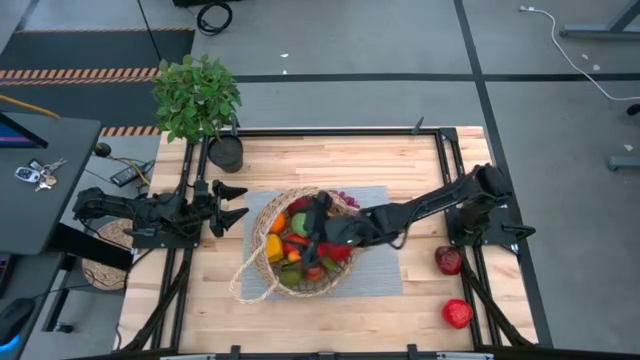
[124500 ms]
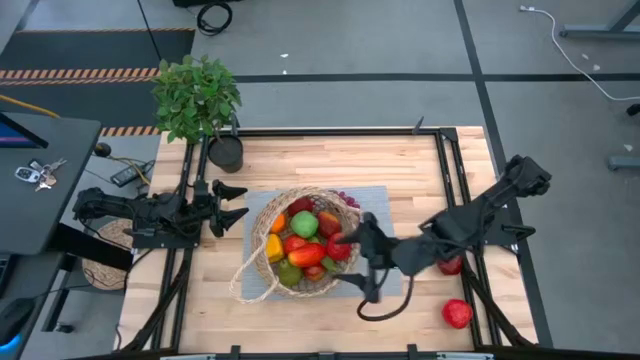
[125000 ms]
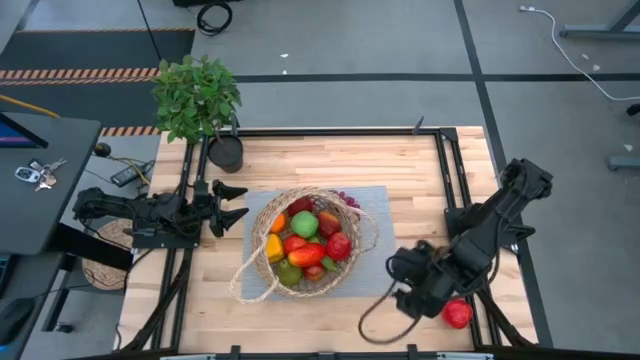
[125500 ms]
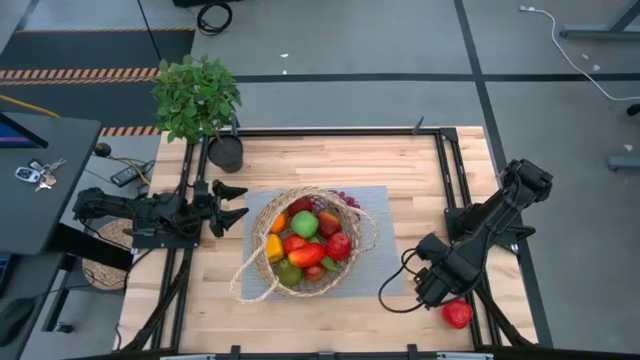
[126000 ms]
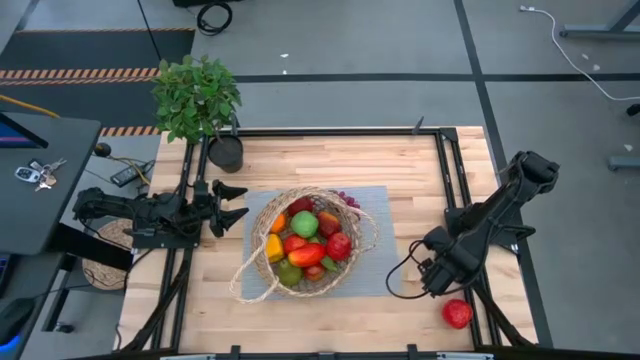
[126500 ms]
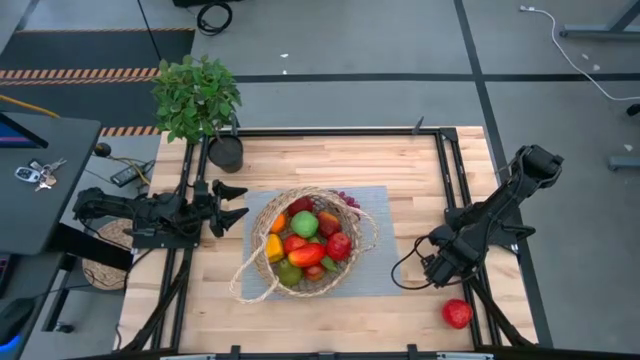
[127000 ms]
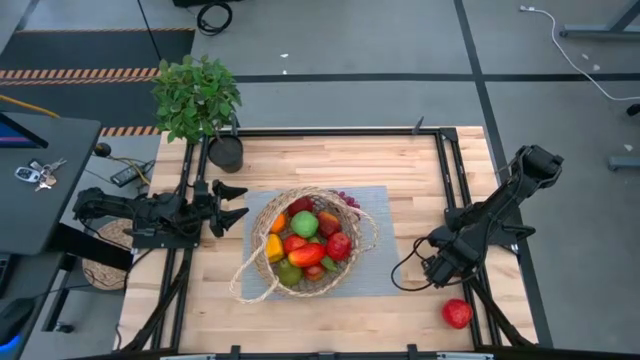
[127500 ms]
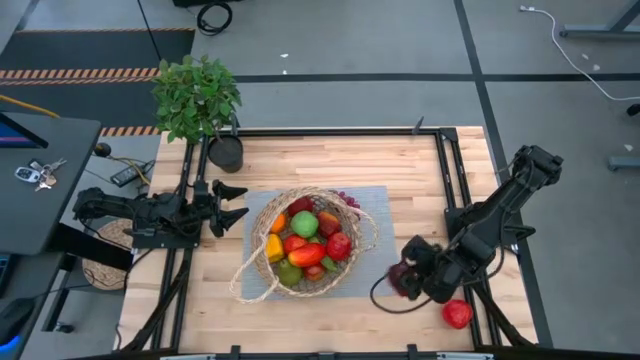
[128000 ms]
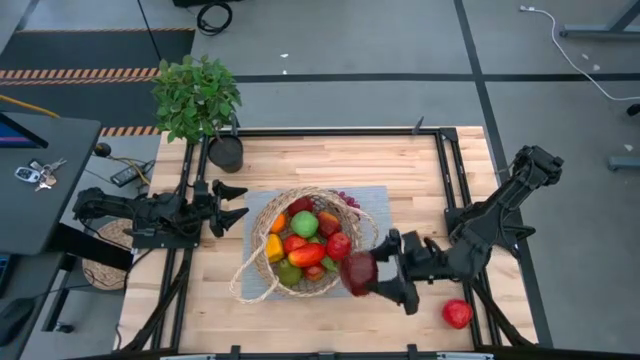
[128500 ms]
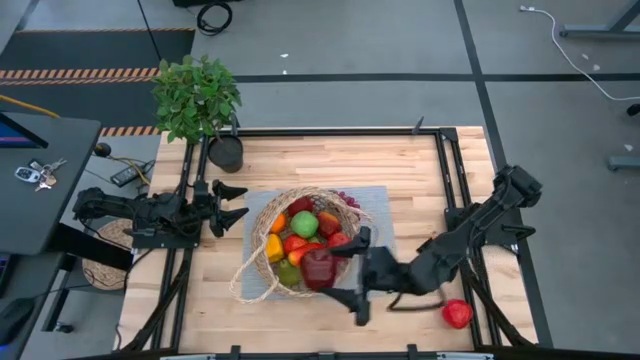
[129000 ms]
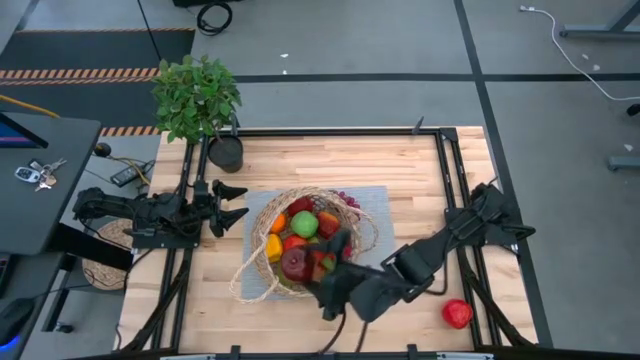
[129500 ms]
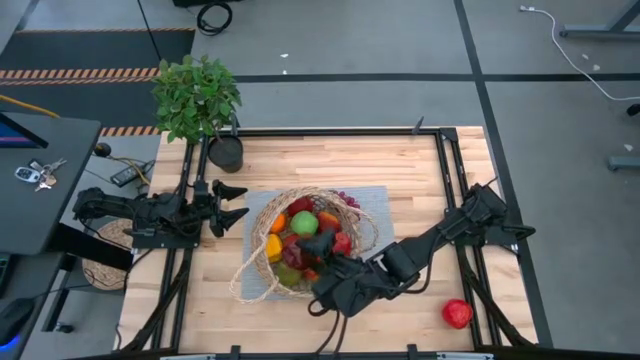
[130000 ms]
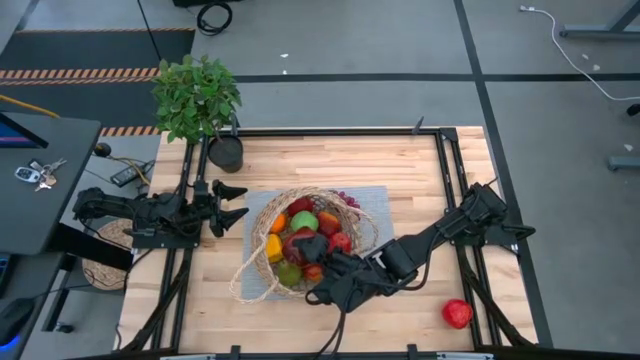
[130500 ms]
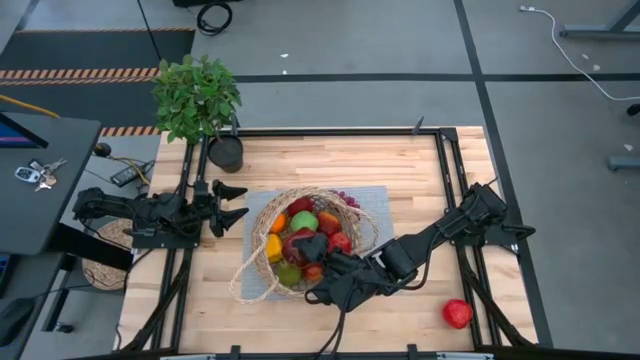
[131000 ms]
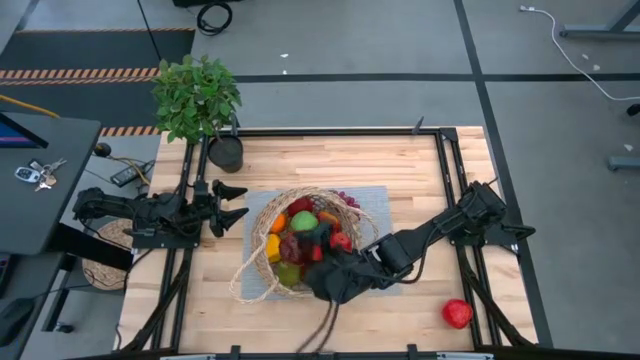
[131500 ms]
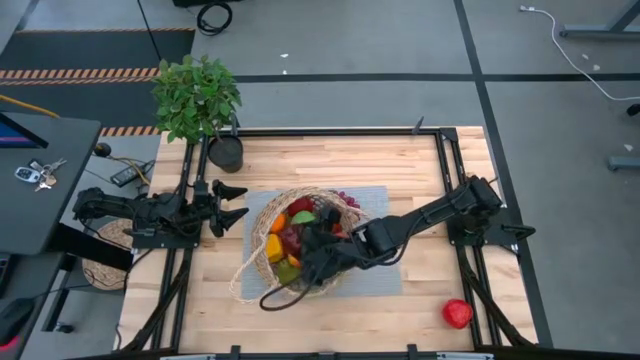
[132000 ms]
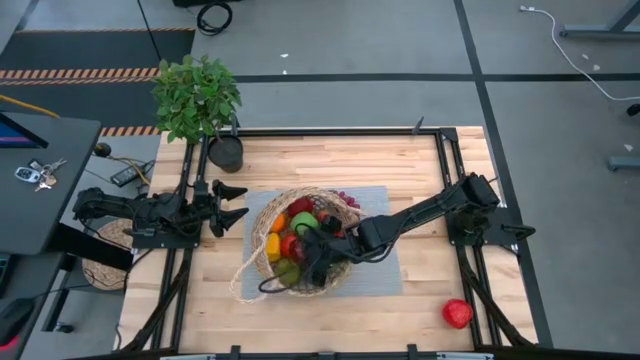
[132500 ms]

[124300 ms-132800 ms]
Task: Build produce basket
Put the dark red apple into the brown basket

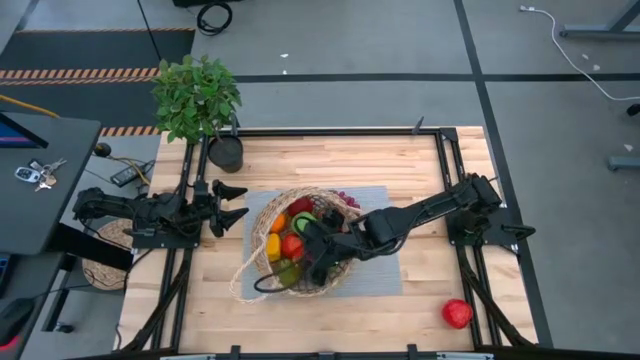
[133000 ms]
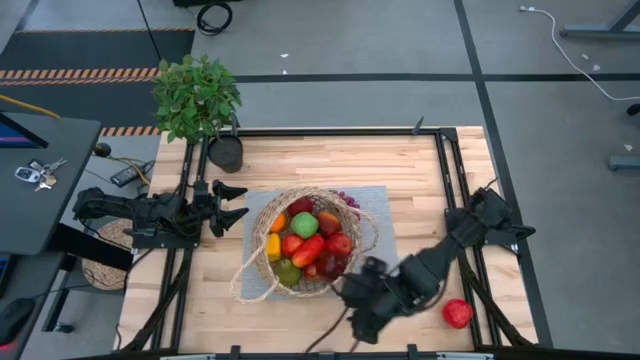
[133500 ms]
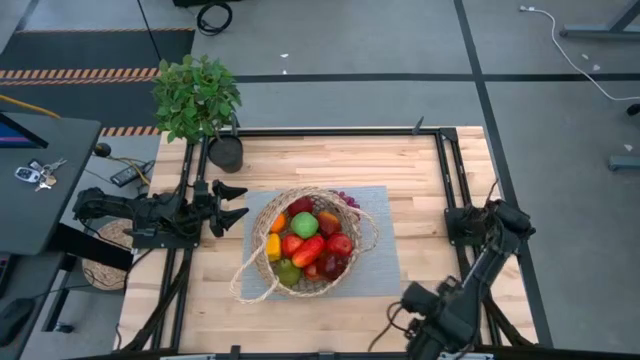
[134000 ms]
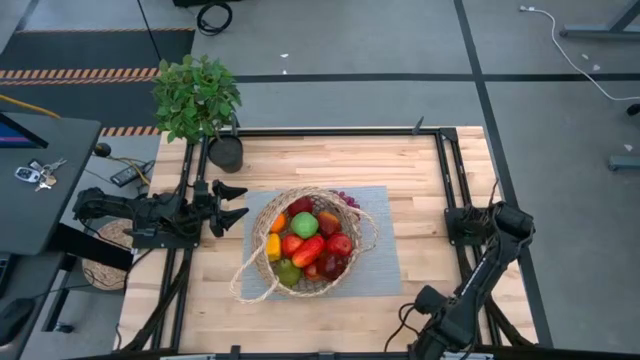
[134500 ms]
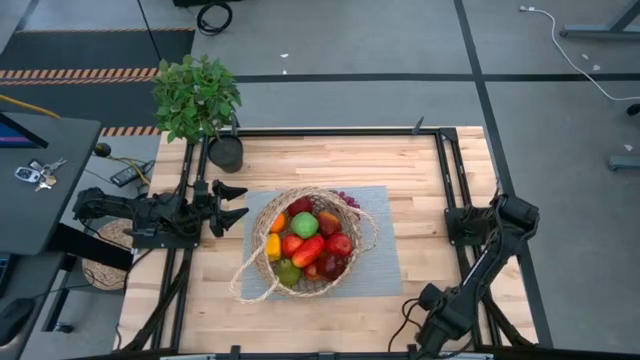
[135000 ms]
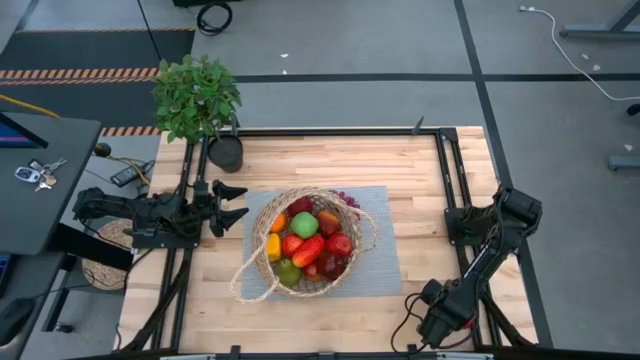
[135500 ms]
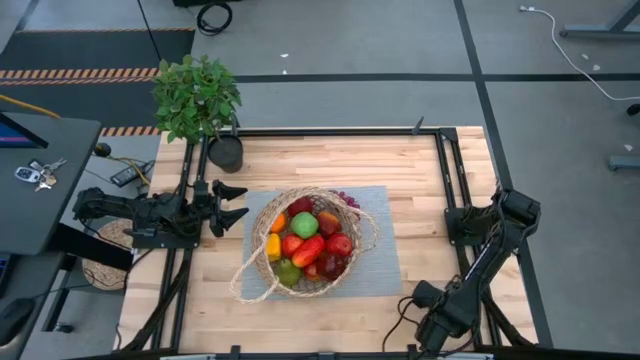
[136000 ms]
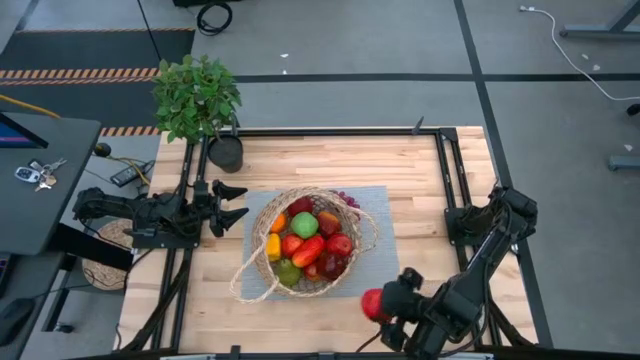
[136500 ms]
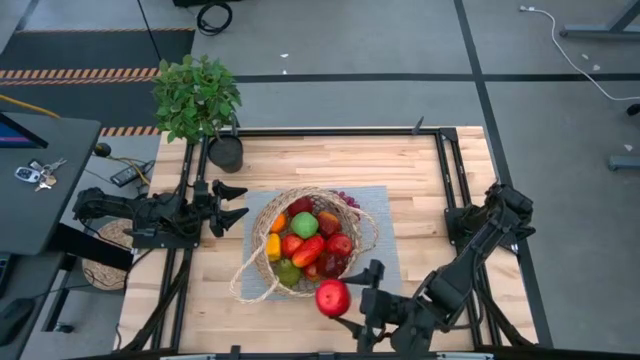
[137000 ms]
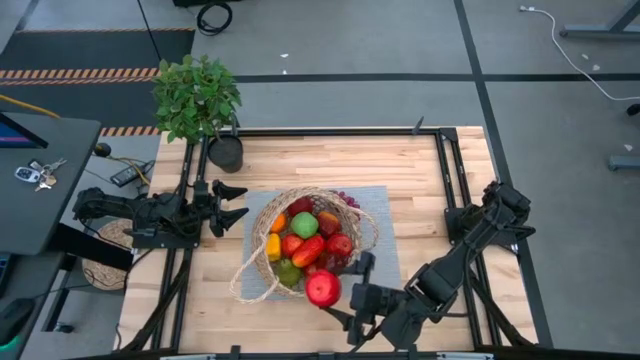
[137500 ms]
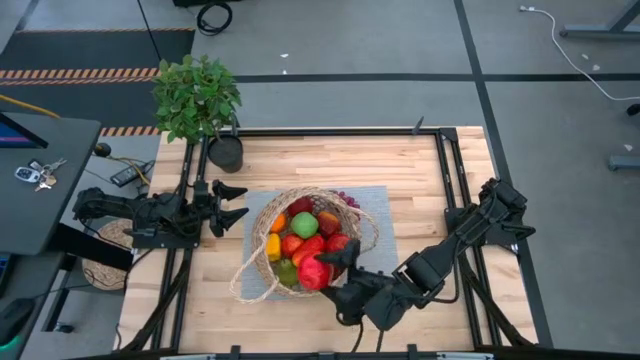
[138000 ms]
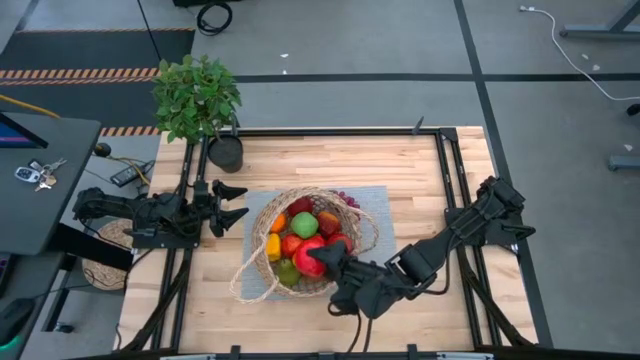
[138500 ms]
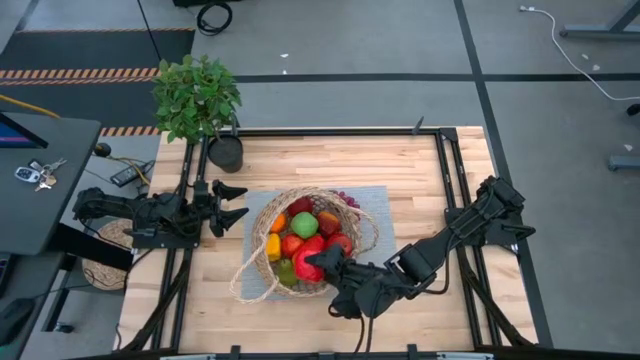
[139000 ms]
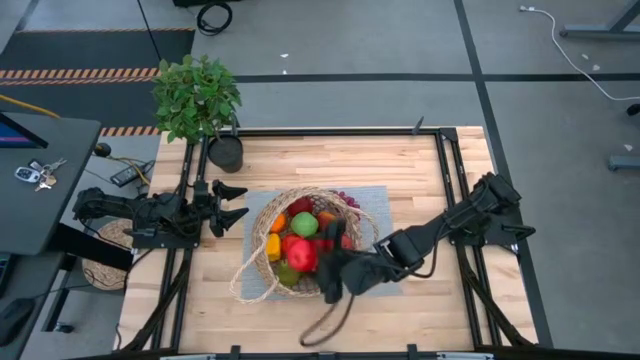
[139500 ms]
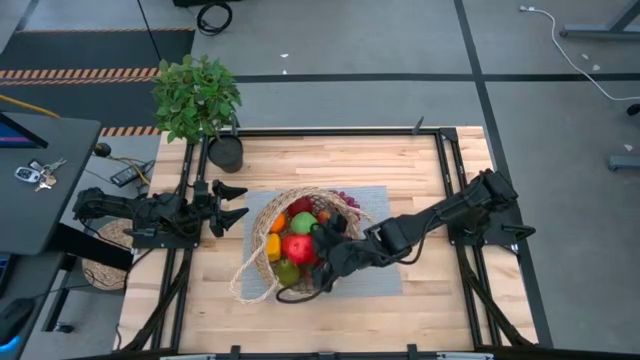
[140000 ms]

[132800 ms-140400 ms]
Put the red apple into the brown basket

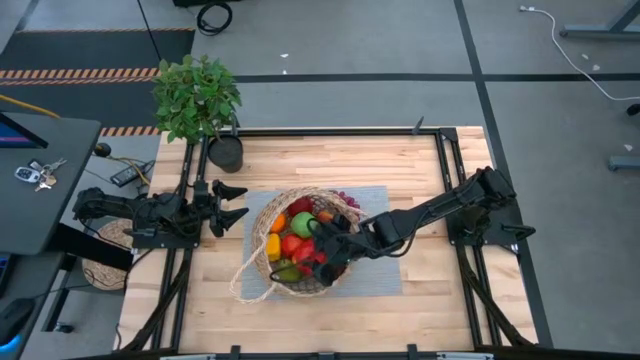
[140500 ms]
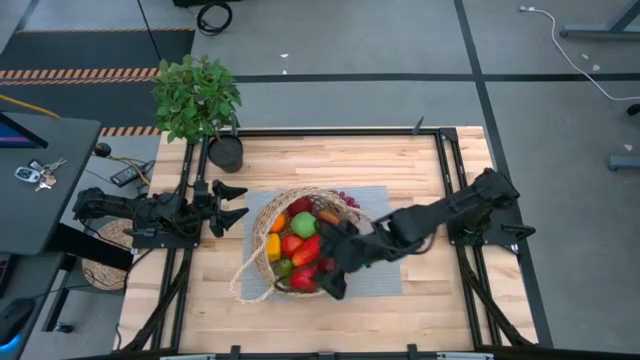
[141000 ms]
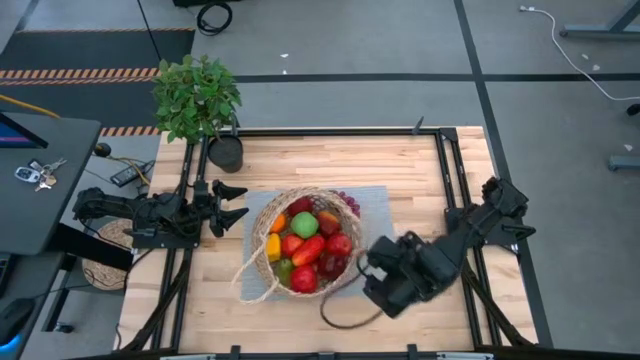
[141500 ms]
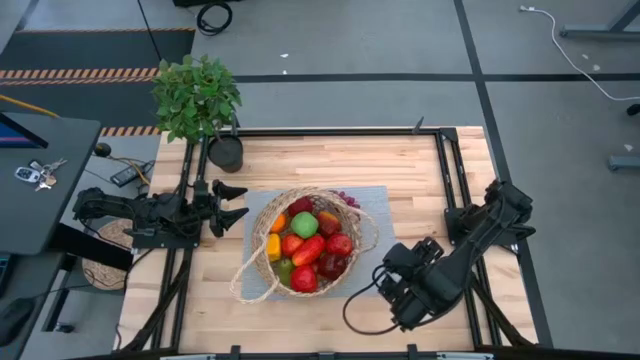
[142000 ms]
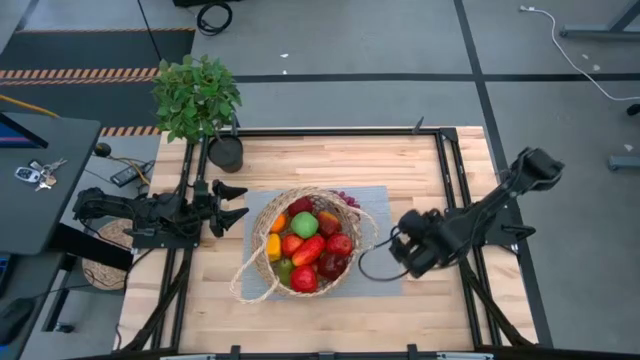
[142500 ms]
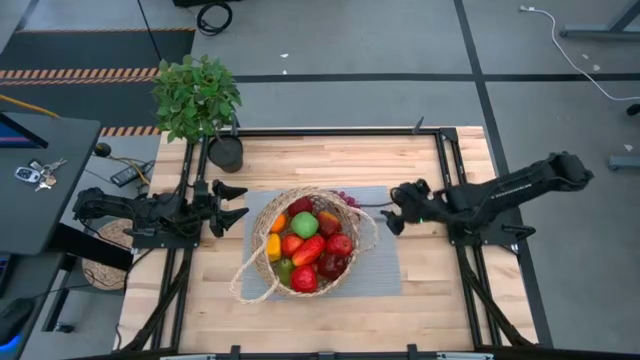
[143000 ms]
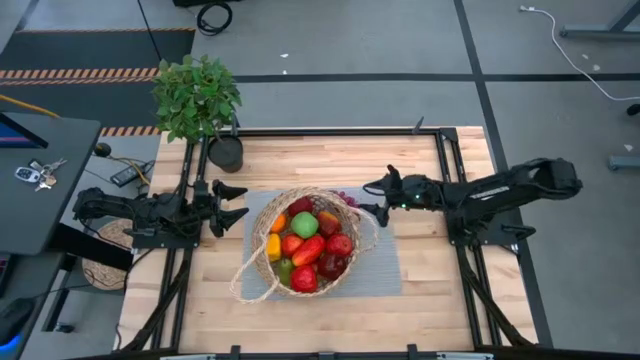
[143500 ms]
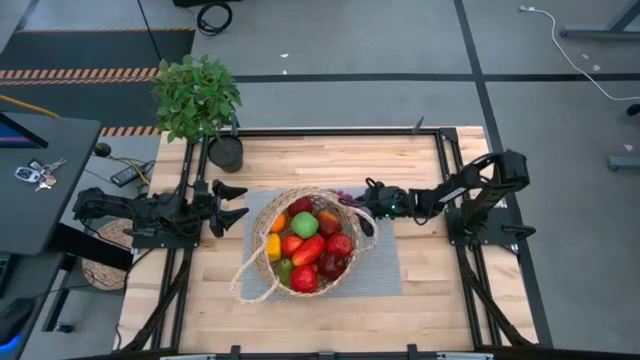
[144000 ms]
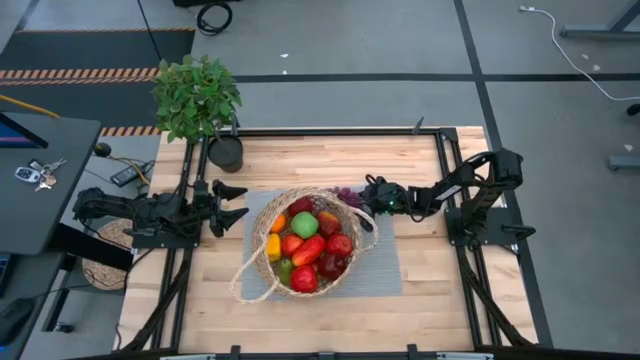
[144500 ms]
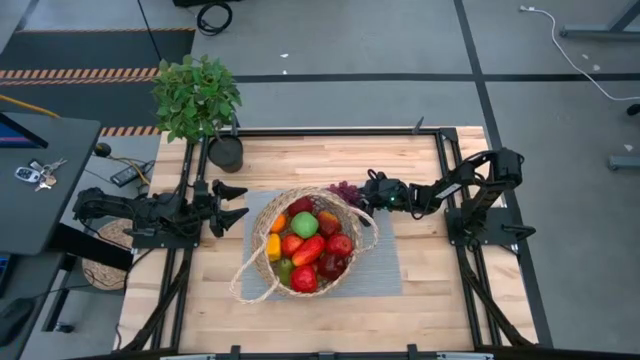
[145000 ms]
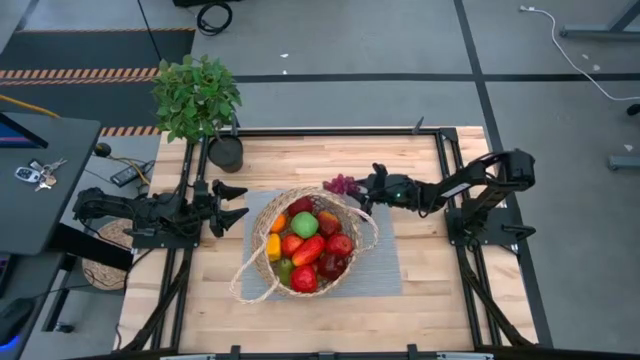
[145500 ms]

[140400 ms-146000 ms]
Put the red grapes into the brown basket
